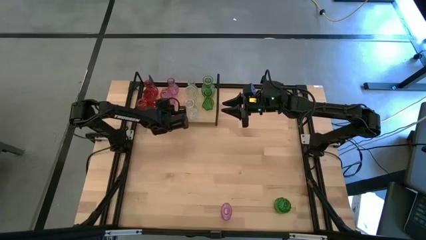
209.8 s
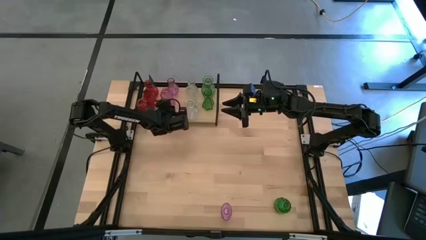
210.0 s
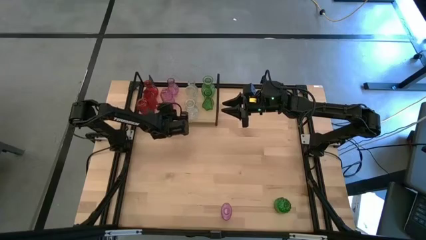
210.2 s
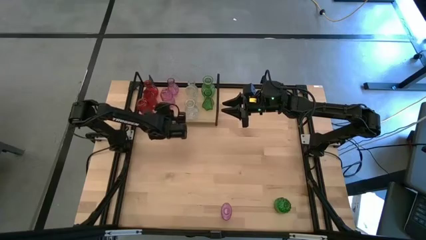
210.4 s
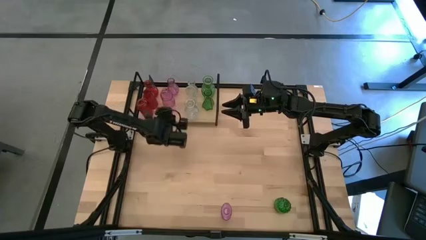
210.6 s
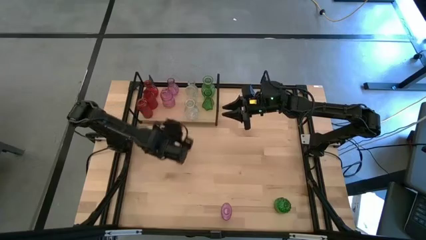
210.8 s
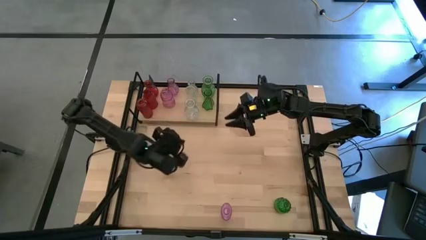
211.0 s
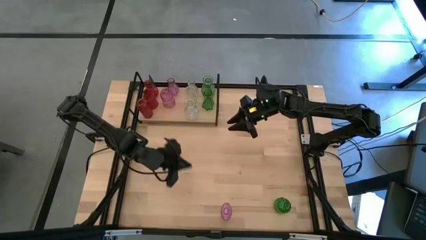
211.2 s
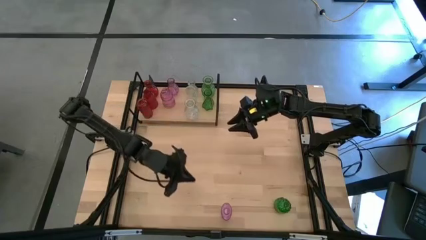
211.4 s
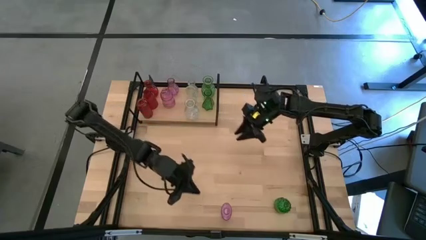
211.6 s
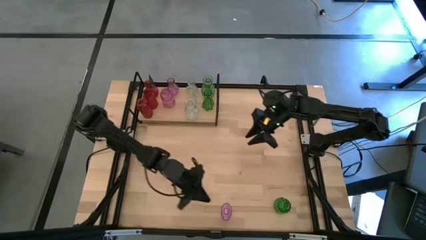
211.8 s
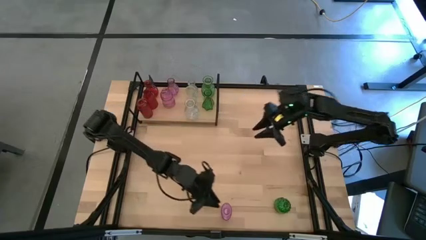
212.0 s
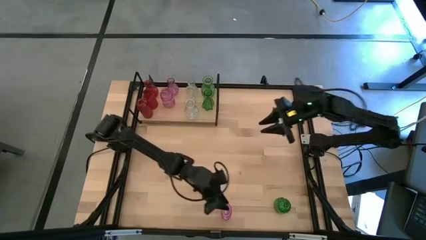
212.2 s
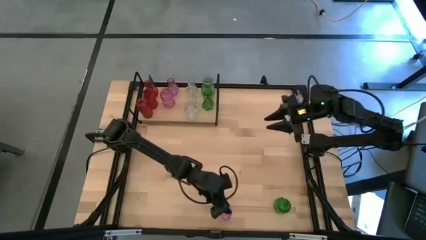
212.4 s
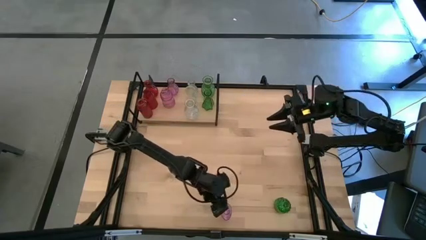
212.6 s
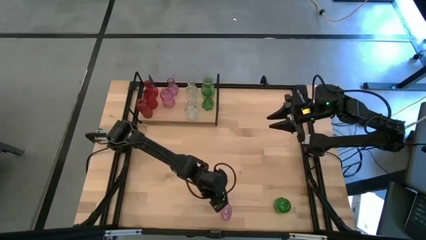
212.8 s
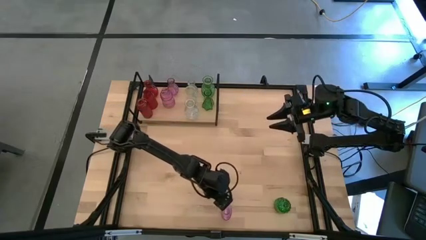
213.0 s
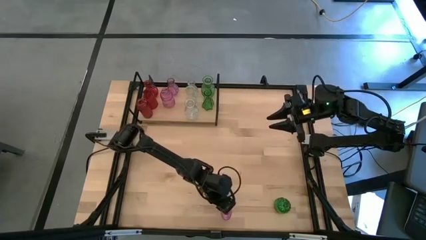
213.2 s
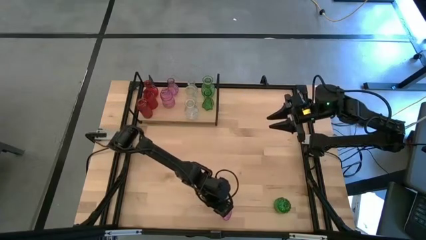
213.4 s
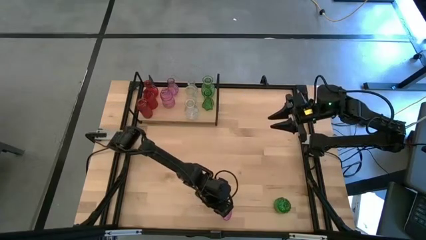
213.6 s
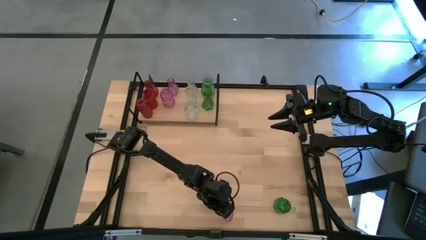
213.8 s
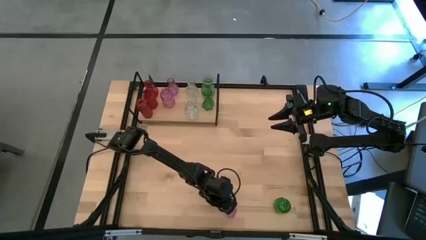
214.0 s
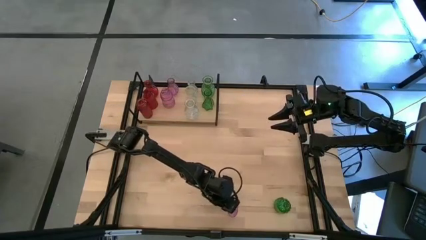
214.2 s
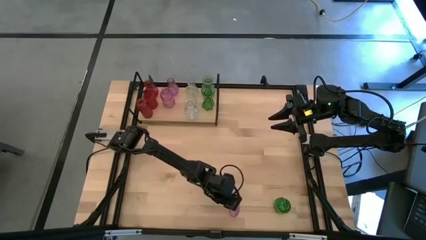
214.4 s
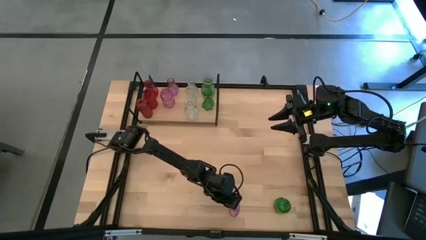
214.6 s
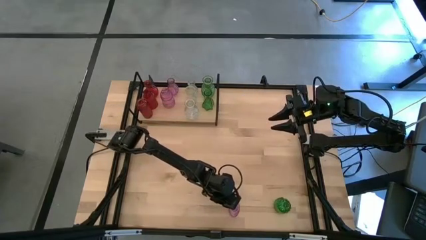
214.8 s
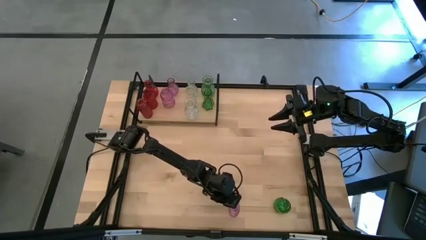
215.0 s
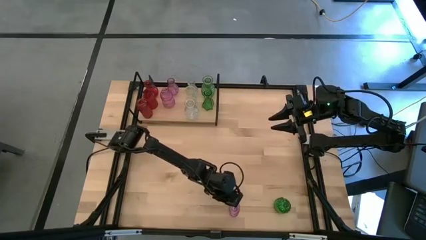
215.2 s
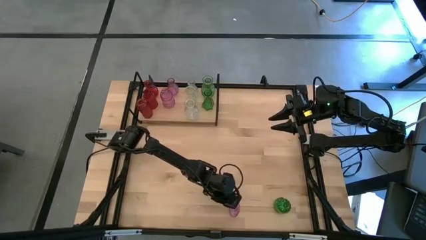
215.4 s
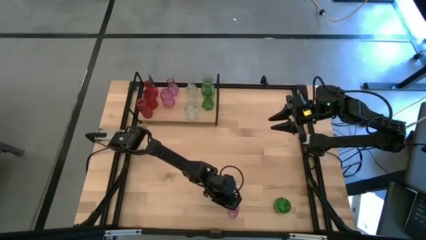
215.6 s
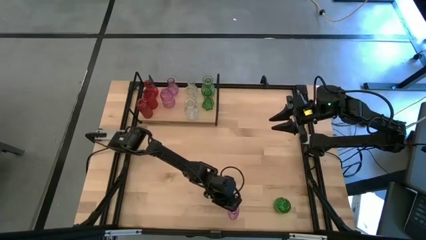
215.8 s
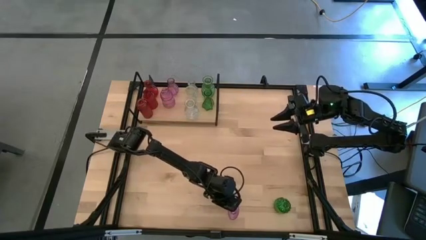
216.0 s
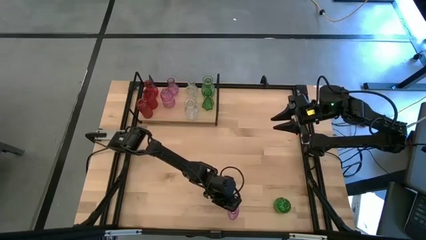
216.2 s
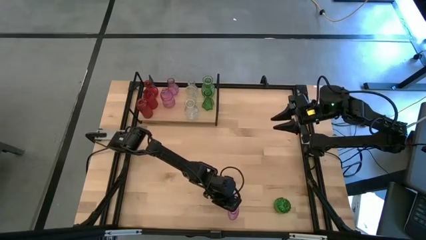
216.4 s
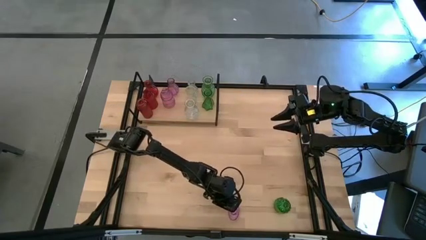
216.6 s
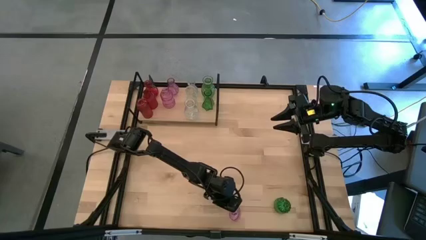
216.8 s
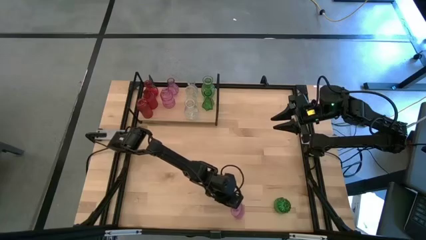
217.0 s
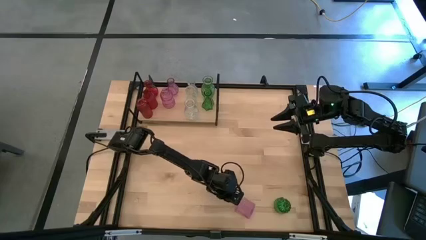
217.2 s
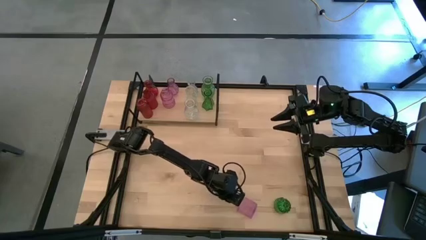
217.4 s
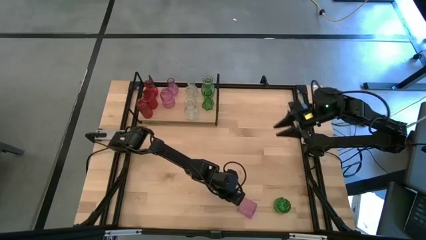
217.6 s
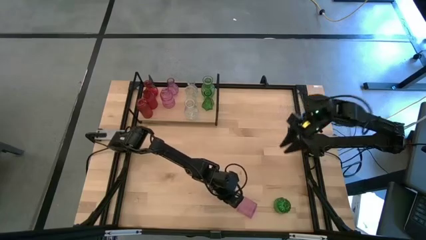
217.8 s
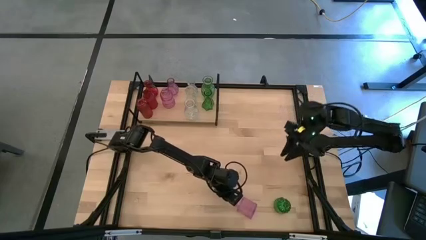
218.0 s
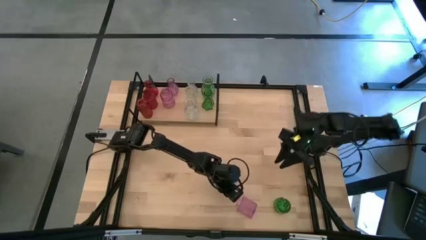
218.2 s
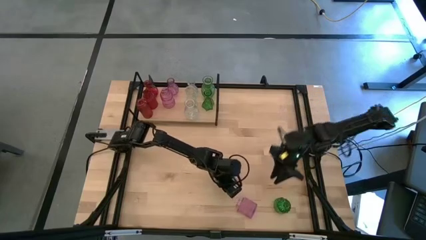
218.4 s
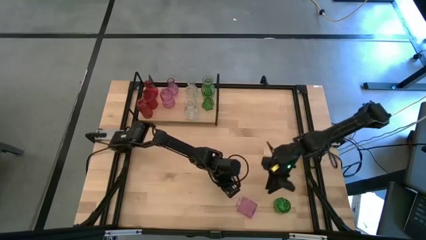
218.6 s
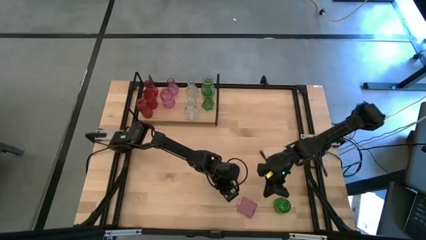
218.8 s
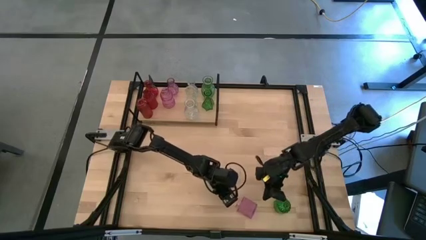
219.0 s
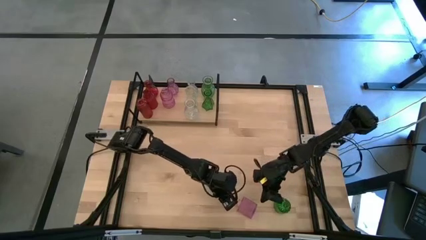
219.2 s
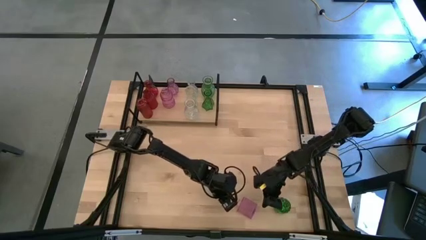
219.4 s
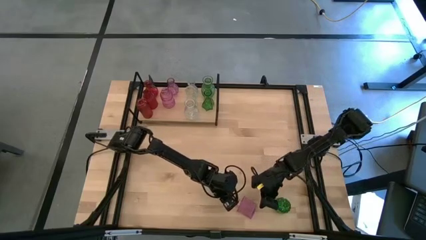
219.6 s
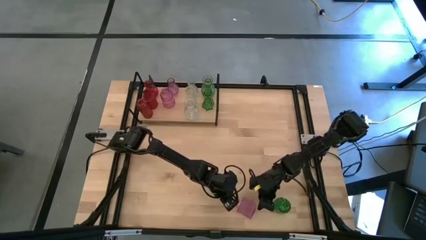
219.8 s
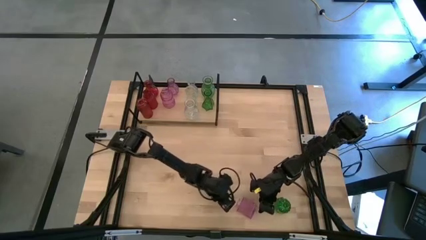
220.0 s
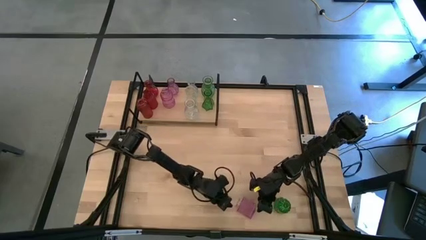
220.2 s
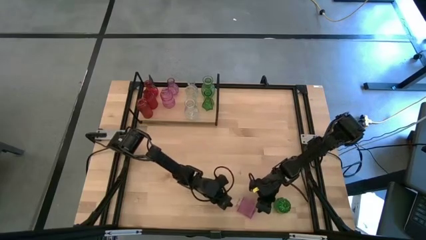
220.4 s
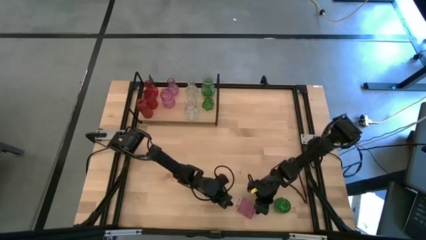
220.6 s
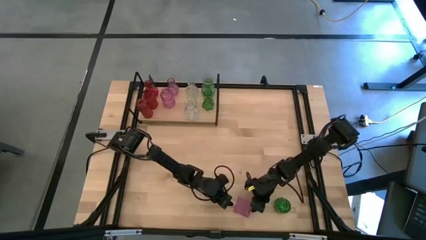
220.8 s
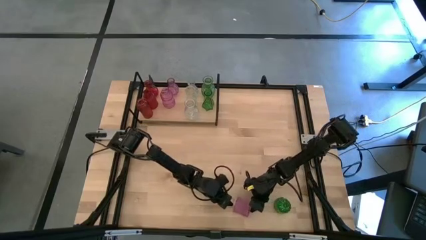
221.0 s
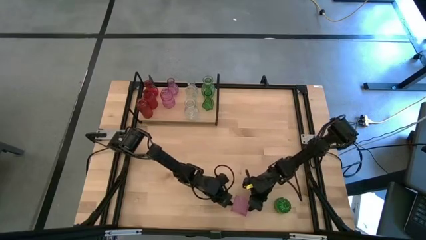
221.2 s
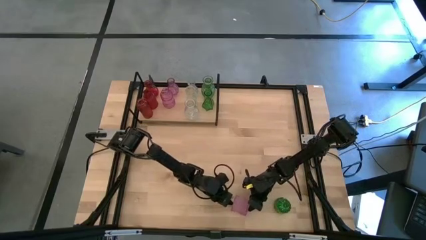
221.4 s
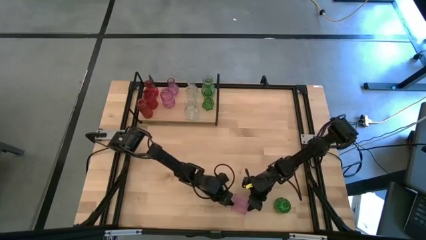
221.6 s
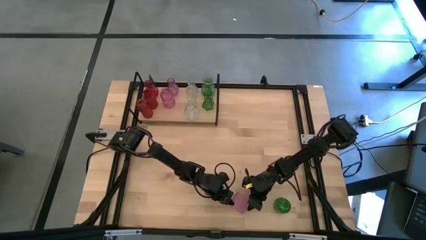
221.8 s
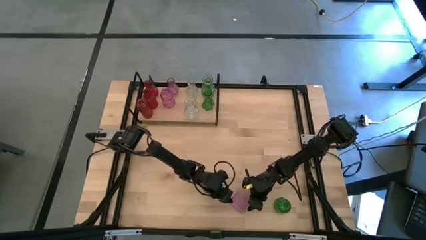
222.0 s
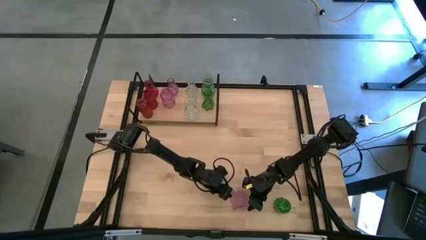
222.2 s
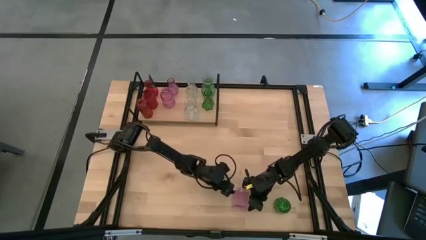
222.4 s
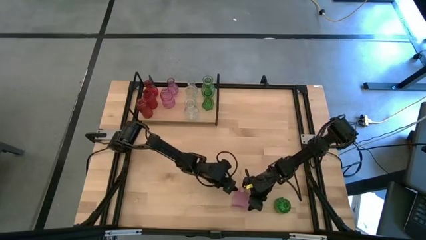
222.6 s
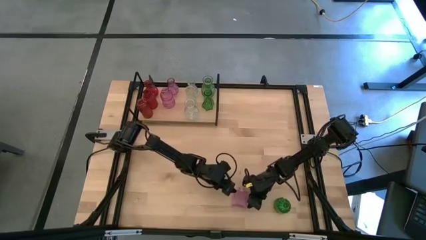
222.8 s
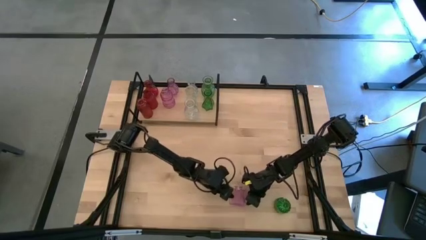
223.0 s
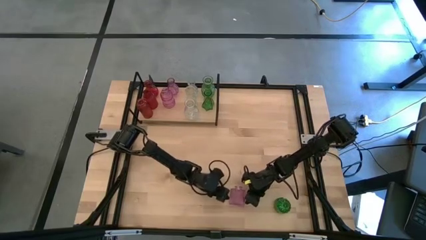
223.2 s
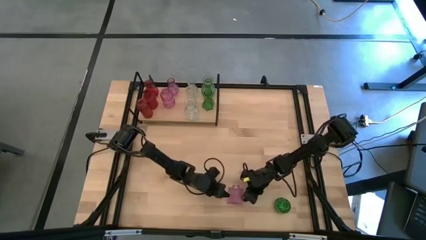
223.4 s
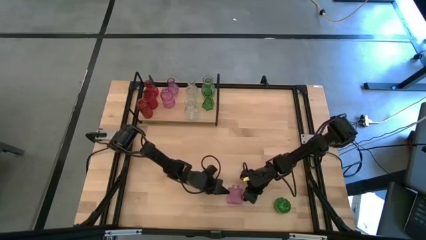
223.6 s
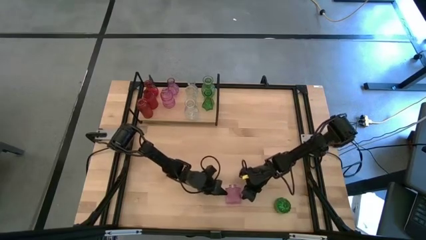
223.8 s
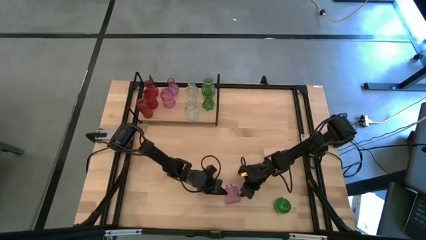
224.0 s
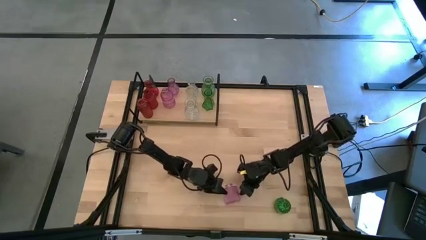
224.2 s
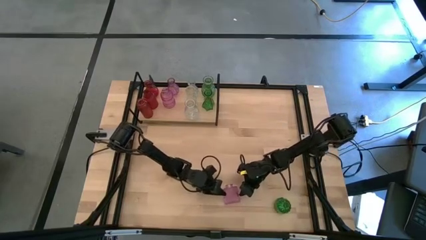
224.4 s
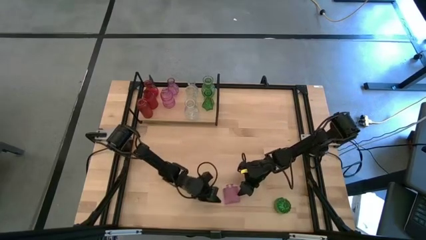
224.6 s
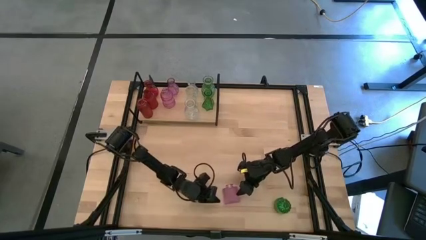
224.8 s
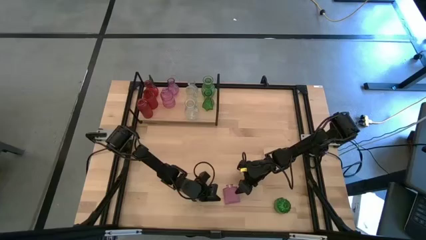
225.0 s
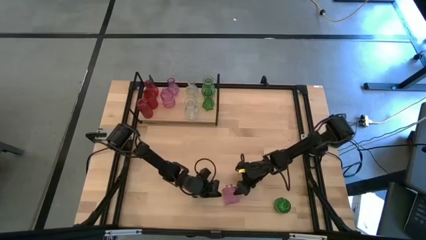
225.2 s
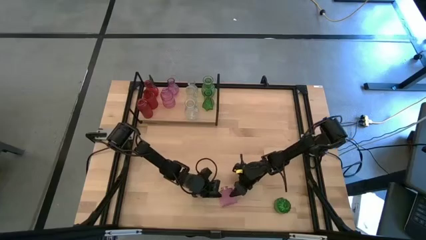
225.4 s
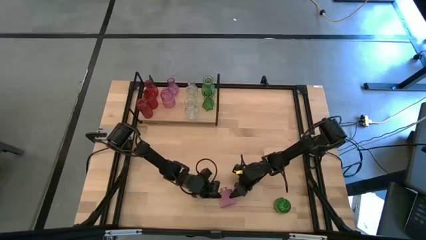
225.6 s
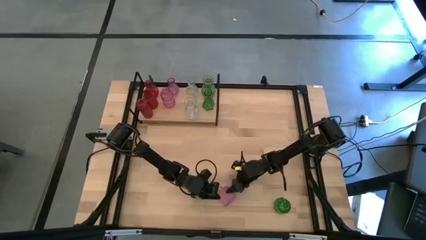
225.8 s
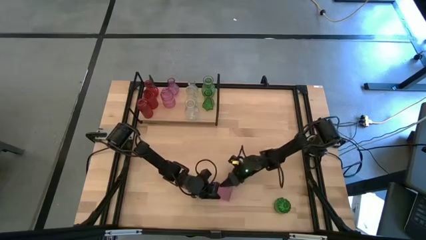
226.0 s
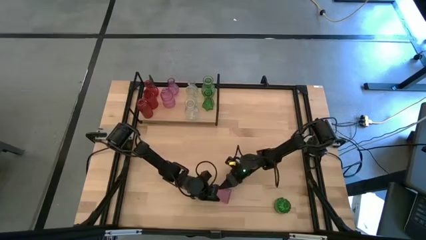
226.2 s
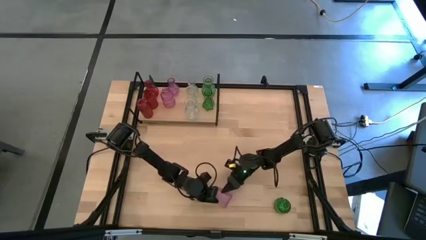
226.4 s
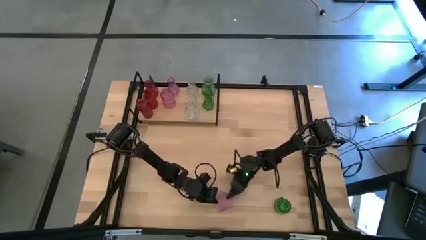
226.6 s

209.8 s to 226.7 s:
Task: sort vases onto shelf
Put the purple vase on the shelf aligned with the other purple vases
